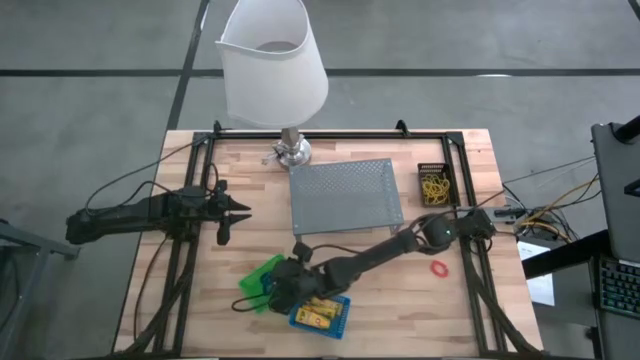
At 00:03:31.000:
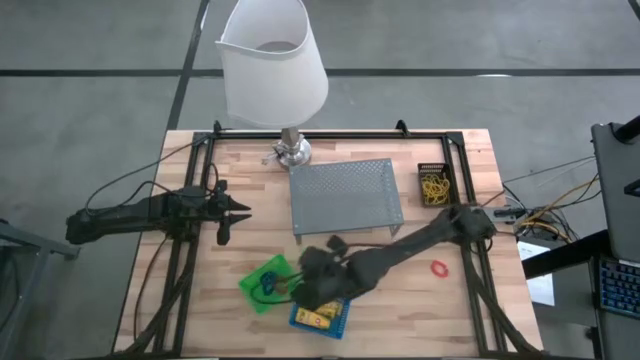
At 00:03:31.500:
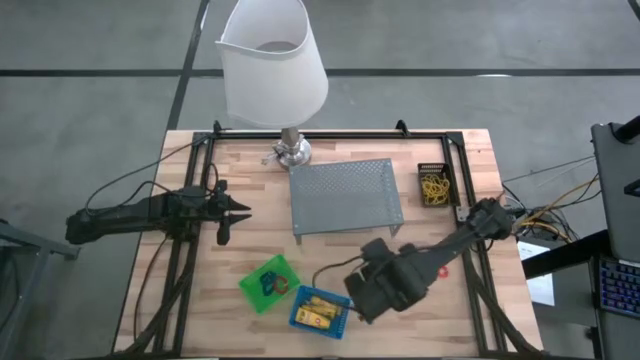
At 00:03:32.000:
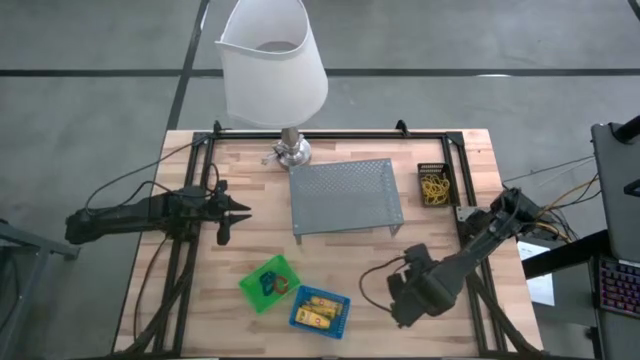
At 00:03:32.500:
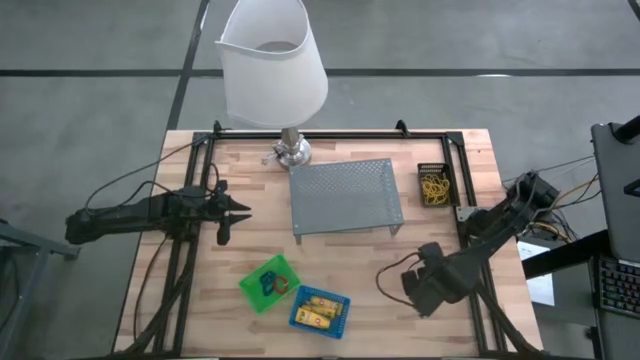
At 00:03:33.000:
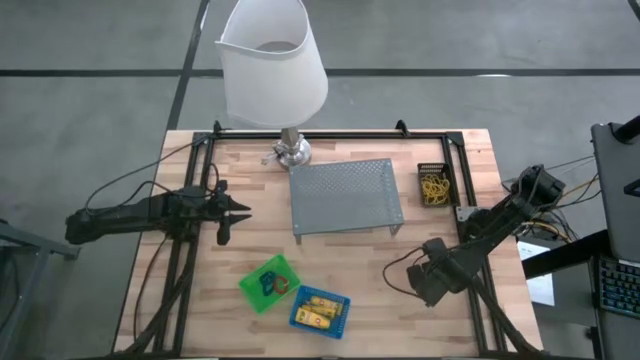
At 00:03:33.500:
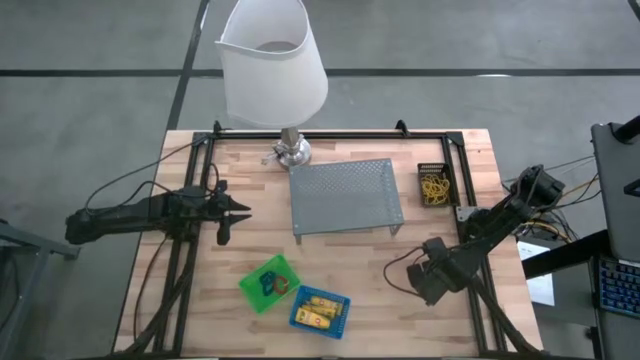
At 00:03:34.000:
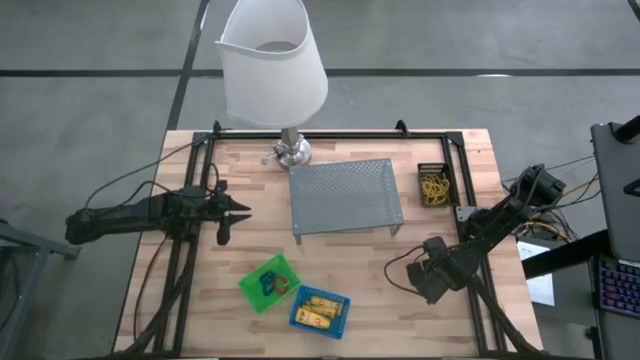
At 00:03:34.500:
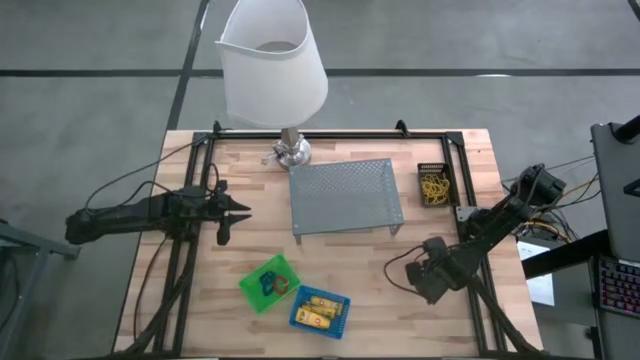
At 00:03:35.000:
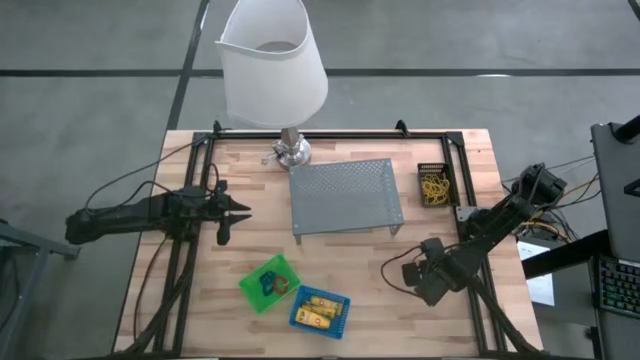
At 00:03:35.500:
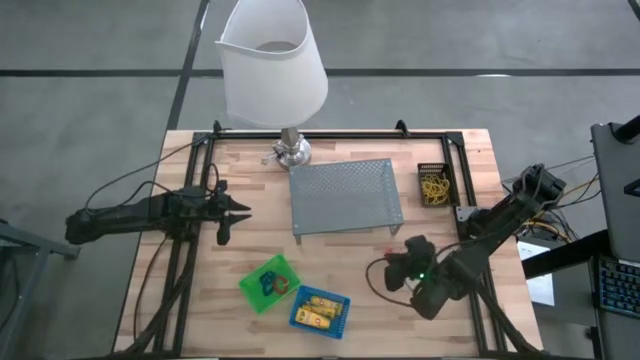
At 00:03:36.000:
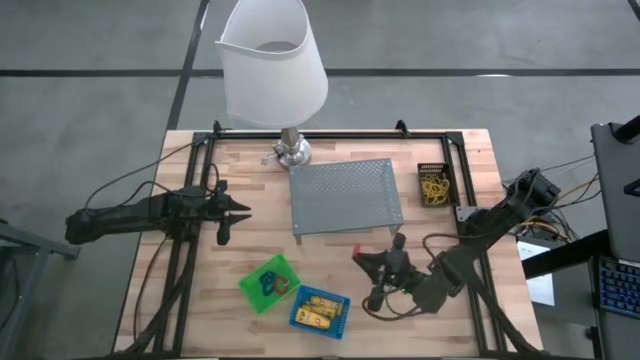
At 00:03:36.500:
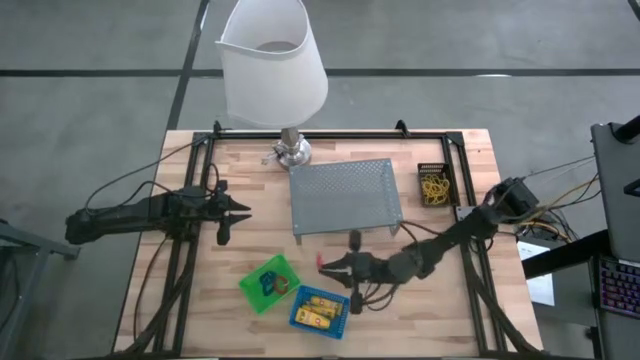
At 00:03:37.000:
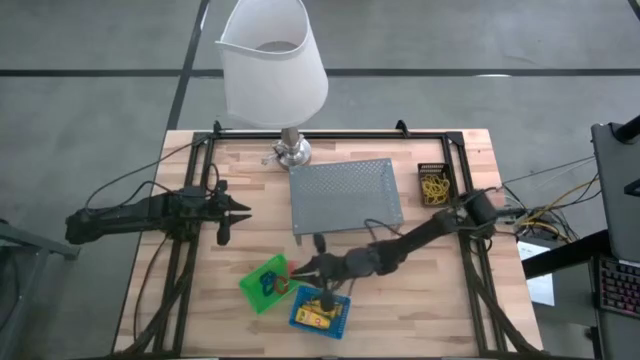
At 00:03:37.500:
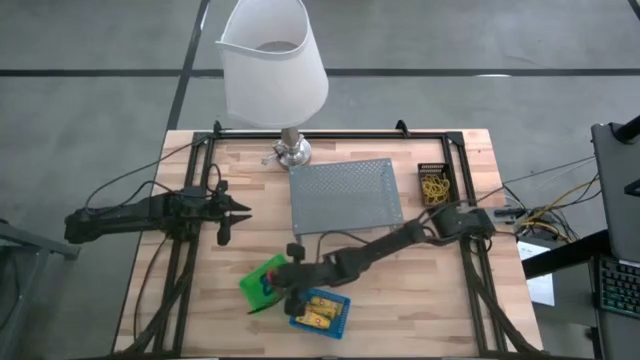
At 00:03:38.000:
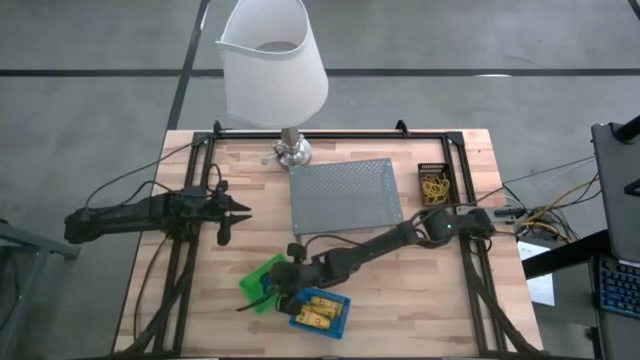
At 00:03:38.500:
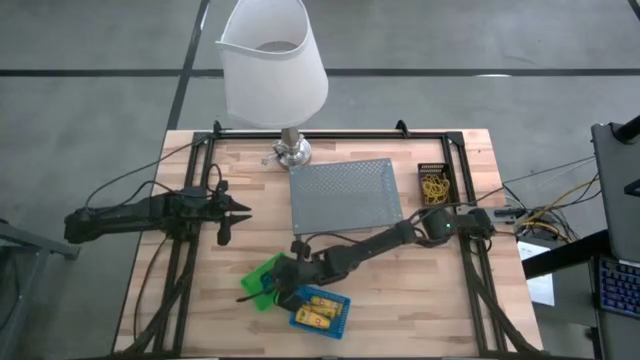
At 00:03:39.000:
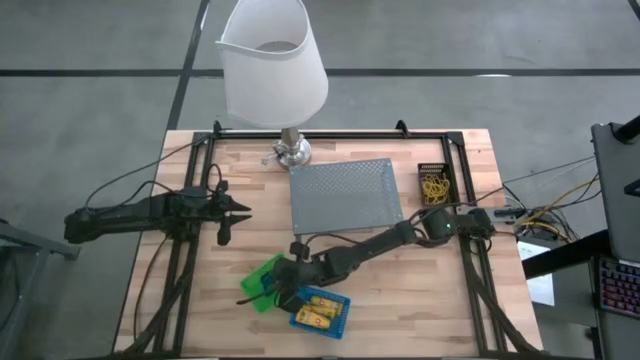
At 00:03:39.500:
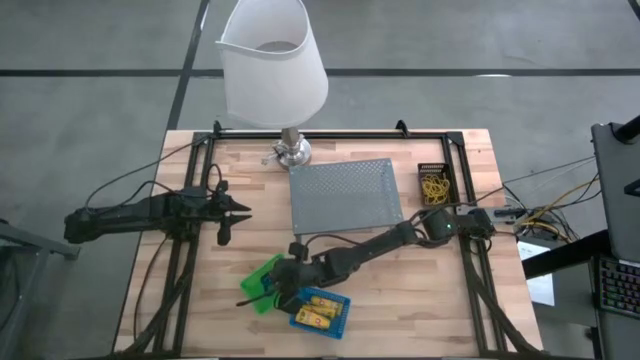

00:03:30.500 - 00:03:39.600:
Task: Pick & Place Office Desk Supplies
Put the orange spring rubber band into the green basket

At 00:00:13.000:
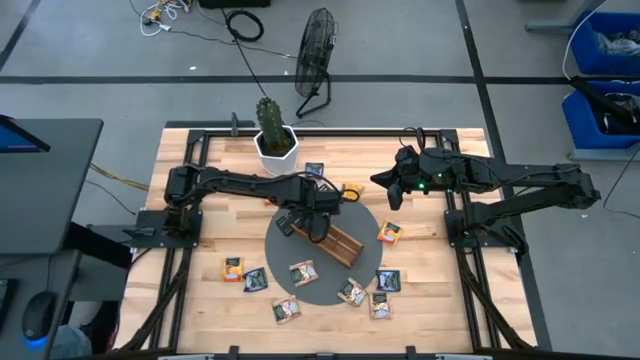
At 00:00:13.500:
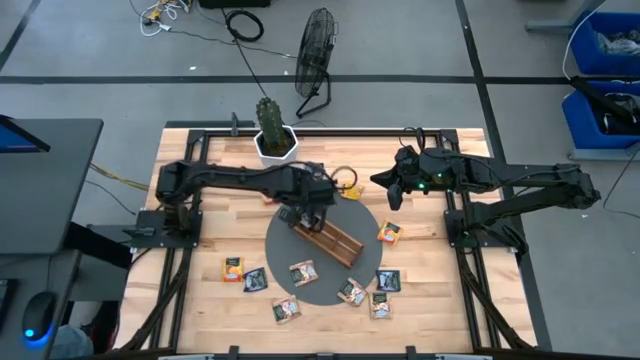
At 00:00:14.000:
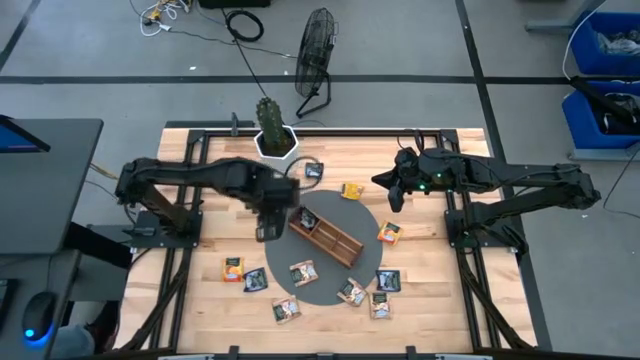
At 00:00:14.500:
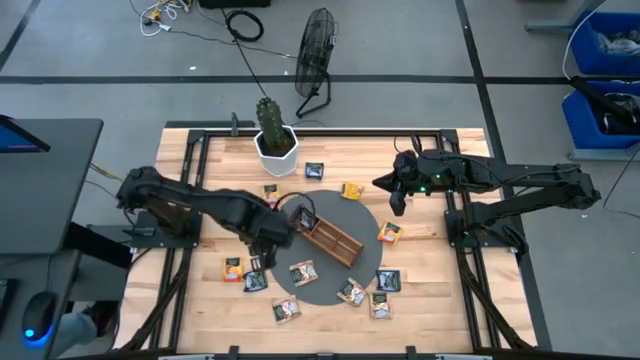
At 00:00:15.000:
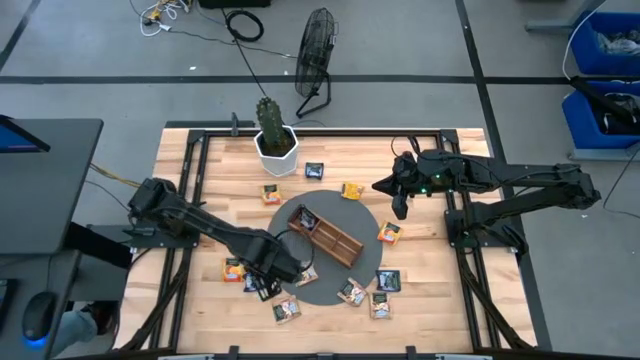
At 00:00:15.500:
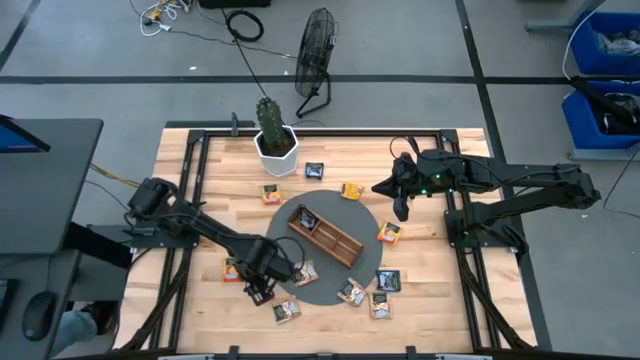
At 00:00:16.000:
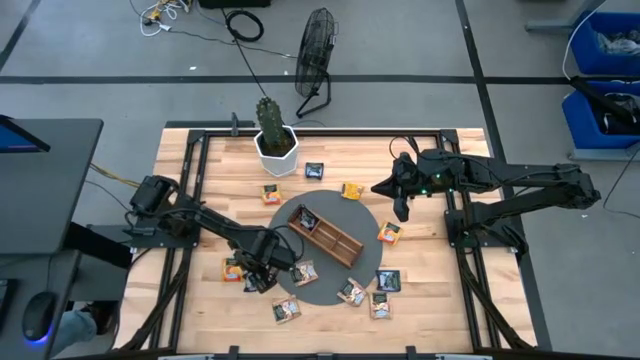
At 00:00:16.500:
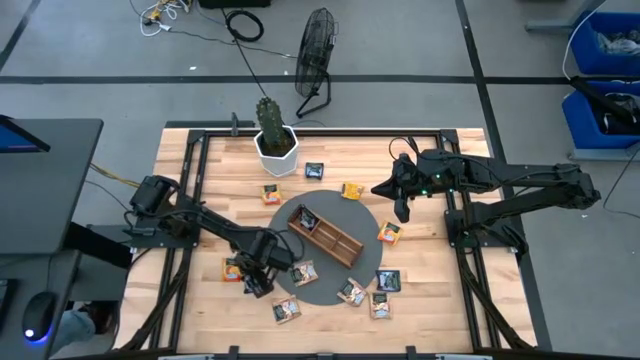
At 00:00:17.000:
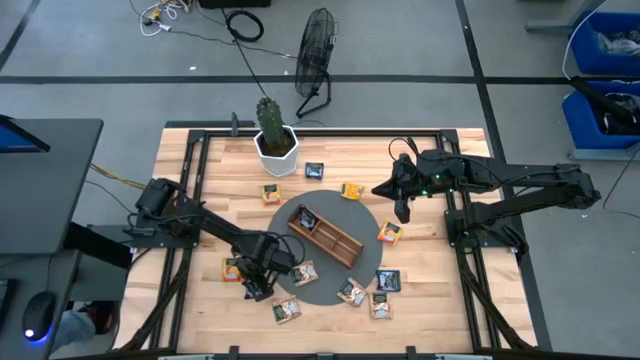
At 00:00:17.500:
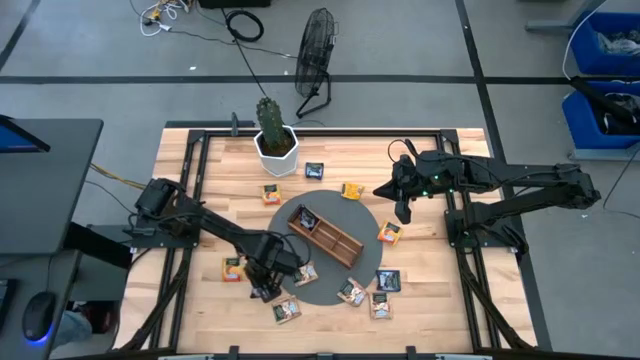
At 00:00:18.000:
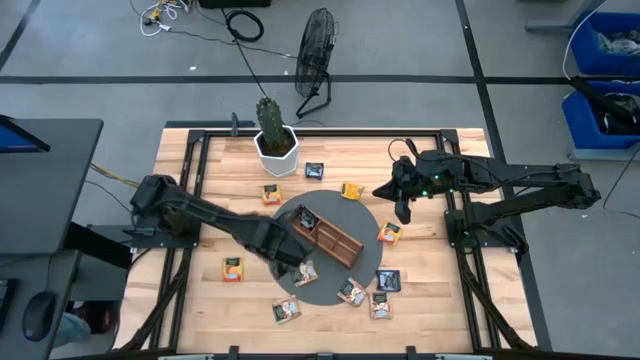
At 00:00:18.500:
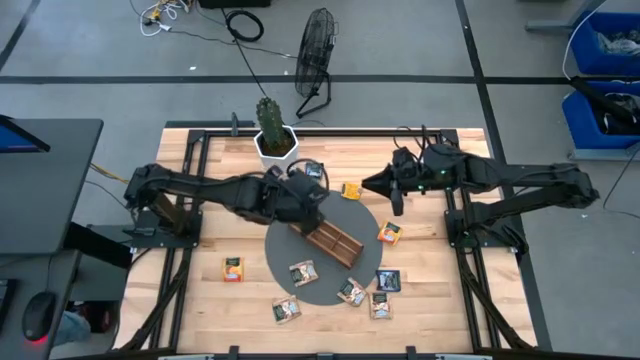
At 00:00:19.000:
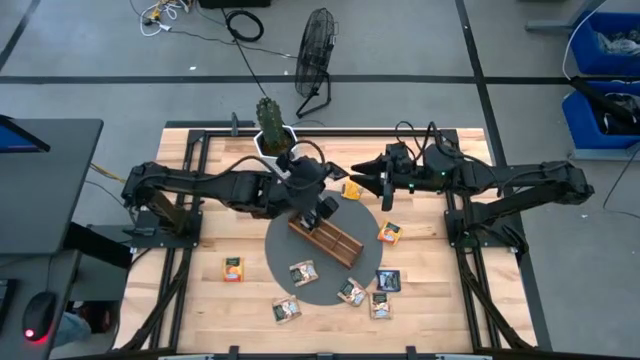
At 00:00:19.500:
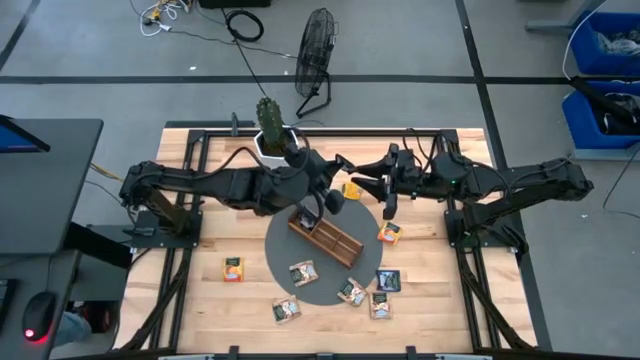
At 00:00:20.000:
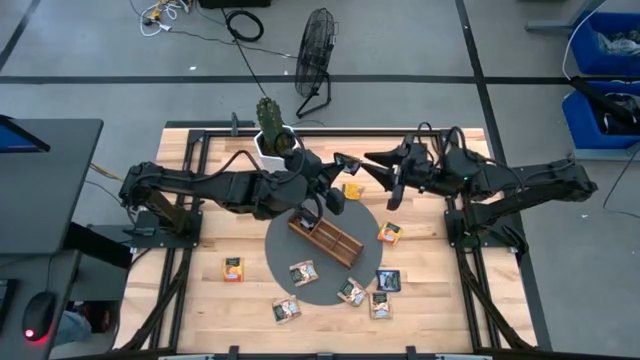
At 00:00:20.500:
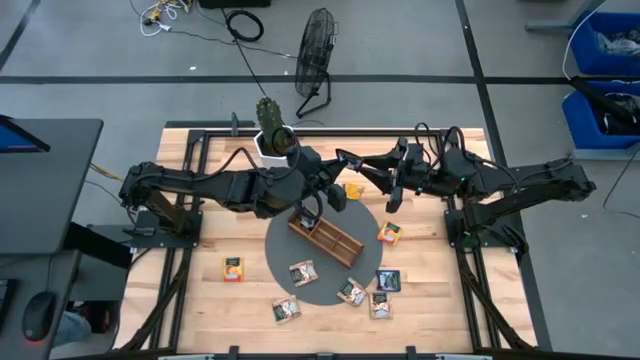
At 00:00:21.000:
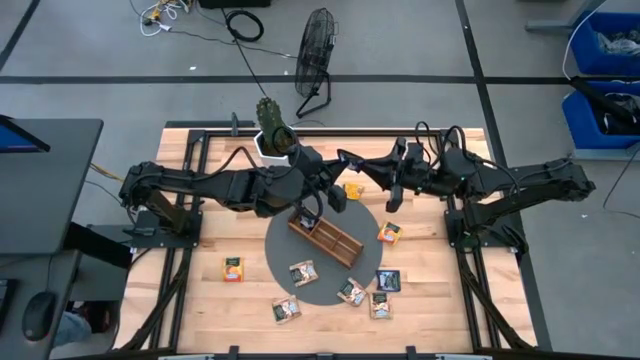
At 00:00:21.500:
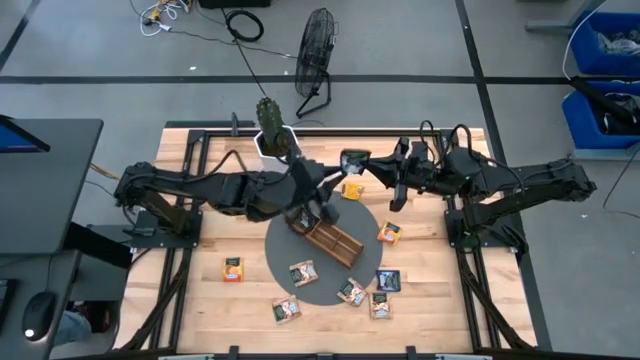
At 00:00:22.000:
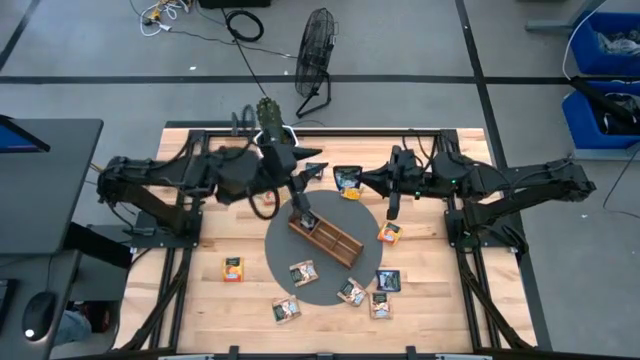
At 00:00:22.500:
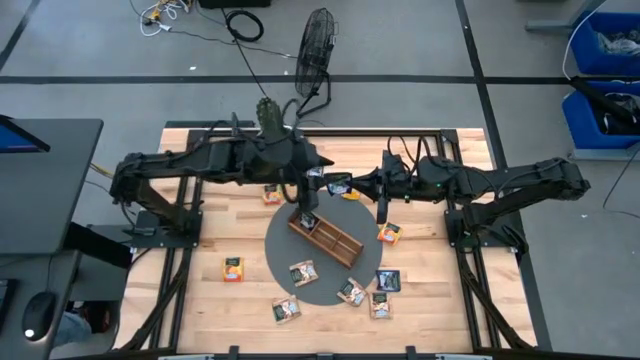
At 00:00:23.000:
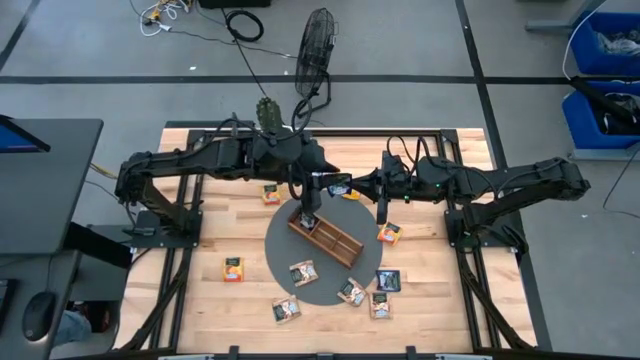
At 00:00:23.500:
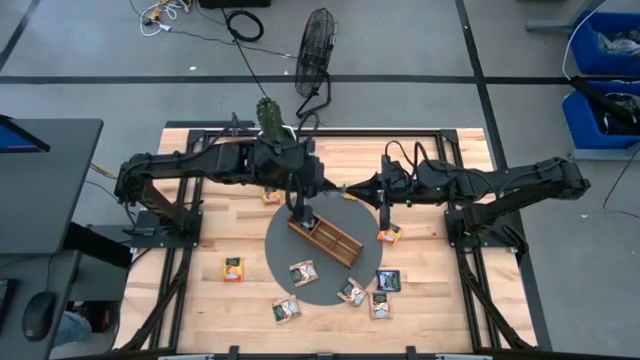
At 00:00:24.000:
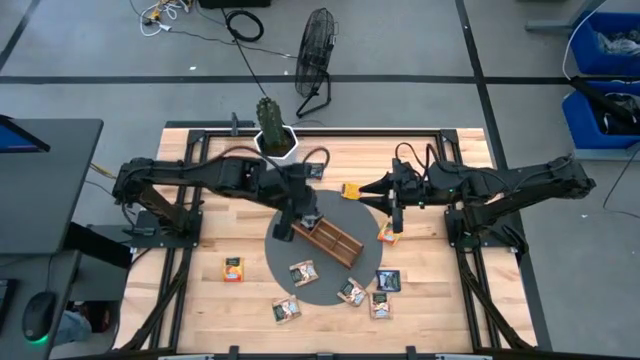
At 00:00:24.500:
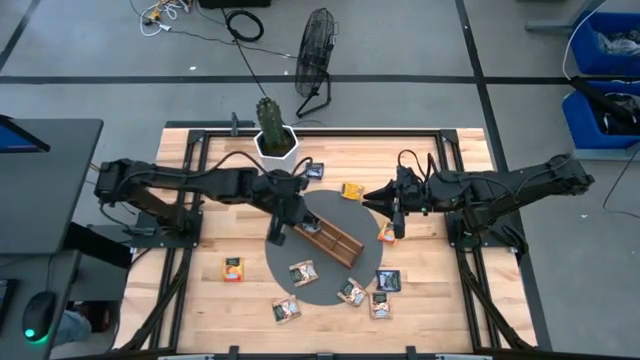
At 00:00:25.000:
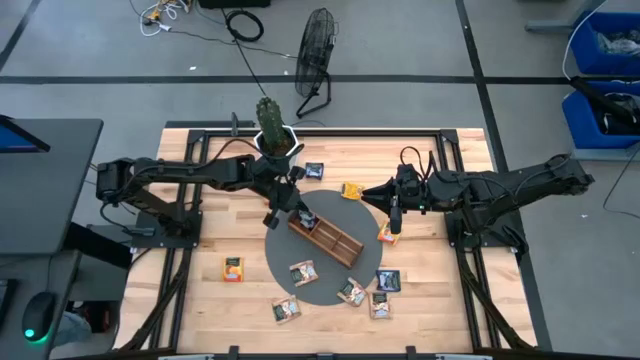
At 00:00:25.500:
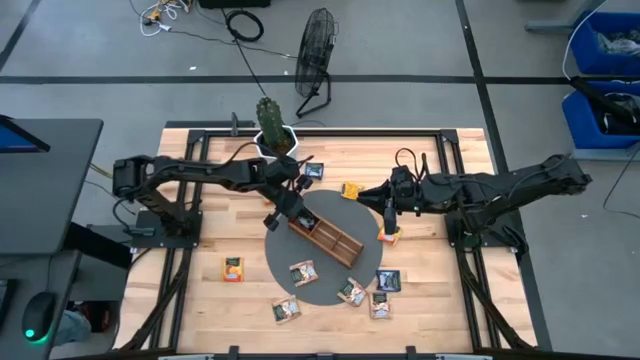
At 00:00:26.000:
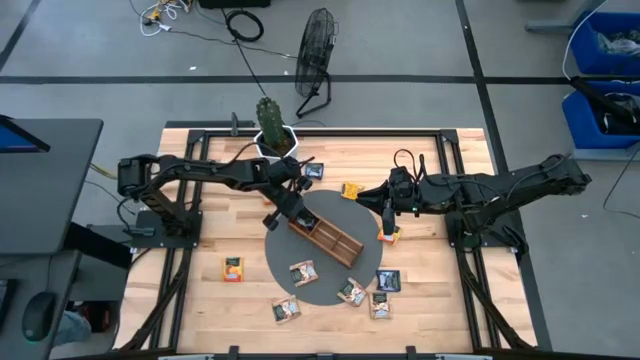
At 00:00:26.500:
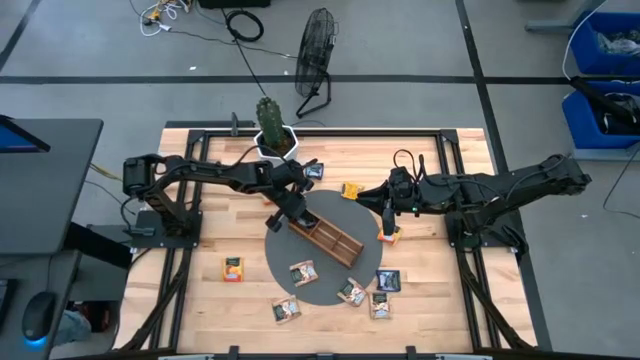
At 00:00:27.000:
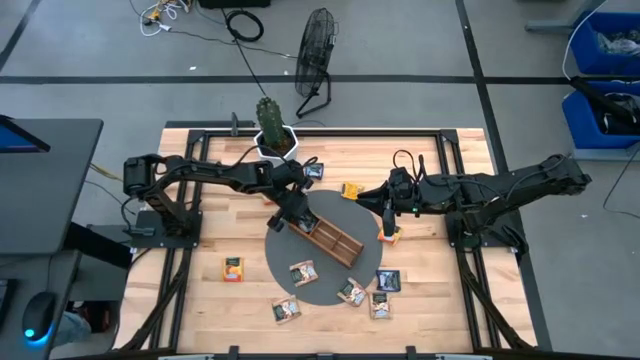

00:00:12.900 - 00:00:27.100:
Task: Pick & Place Tea
Put the purple tea bag into the left section of the wooden organizer
